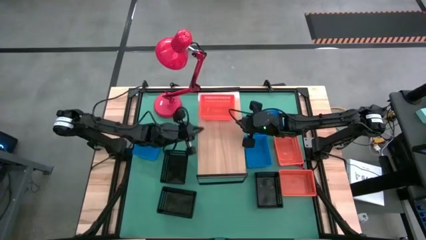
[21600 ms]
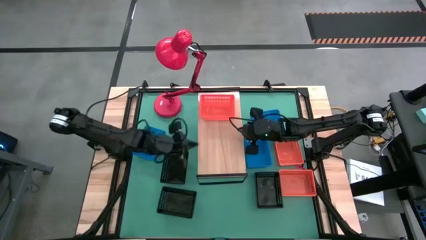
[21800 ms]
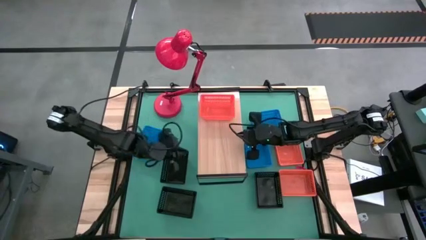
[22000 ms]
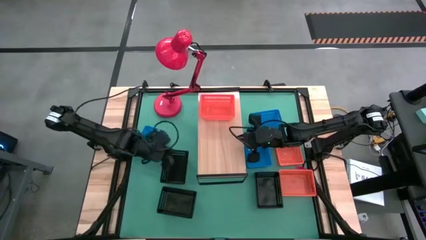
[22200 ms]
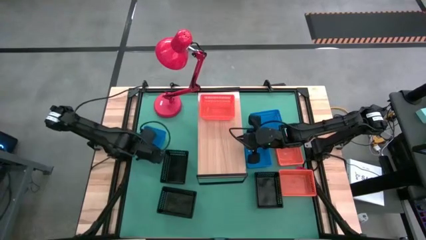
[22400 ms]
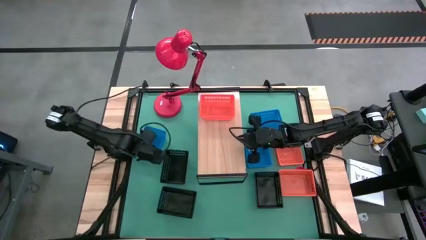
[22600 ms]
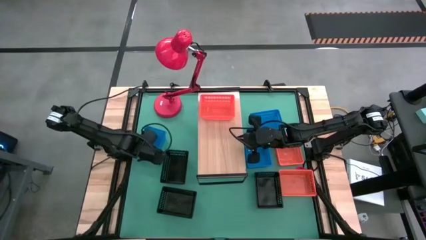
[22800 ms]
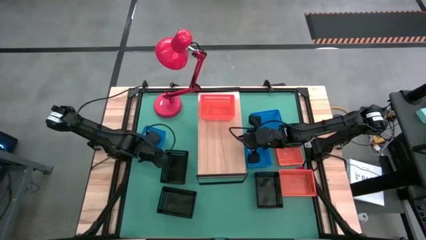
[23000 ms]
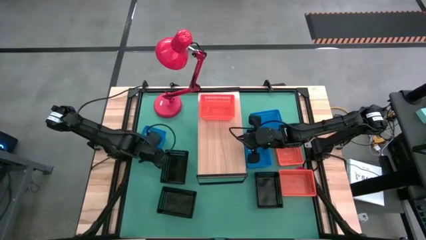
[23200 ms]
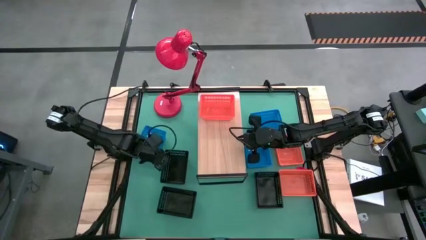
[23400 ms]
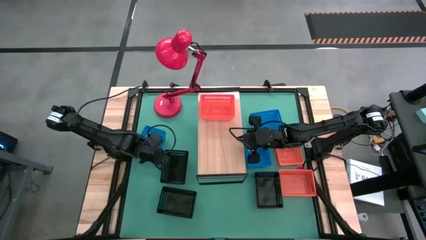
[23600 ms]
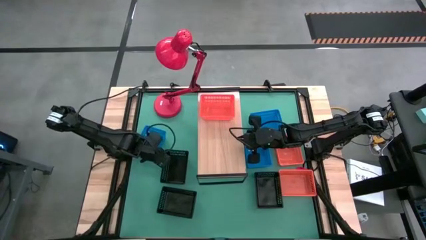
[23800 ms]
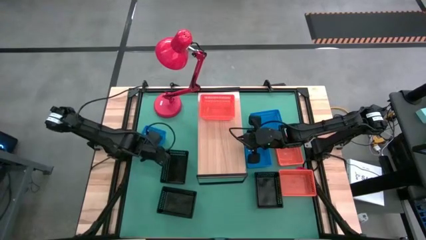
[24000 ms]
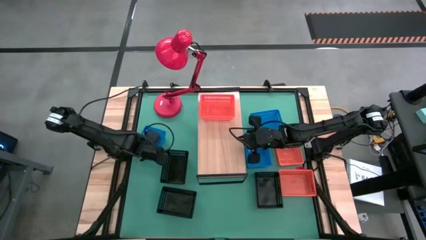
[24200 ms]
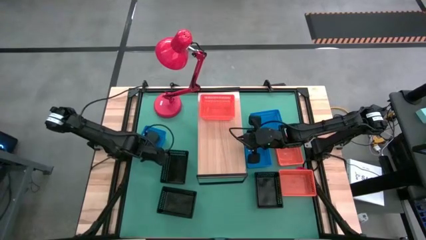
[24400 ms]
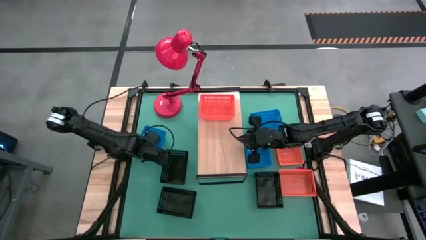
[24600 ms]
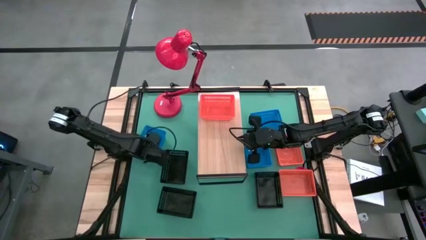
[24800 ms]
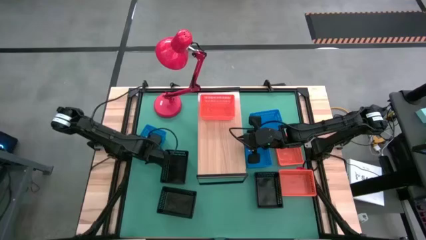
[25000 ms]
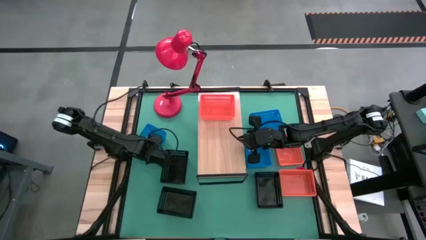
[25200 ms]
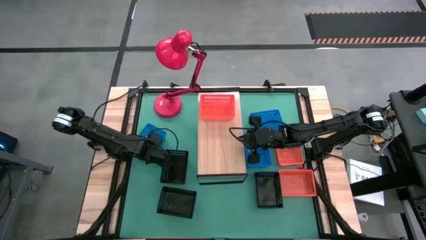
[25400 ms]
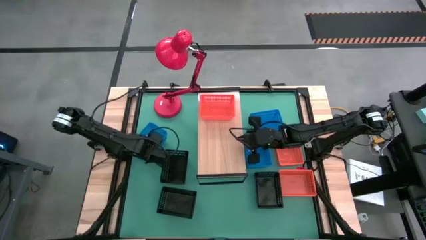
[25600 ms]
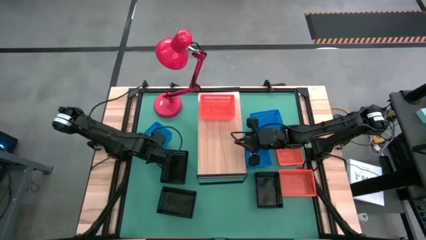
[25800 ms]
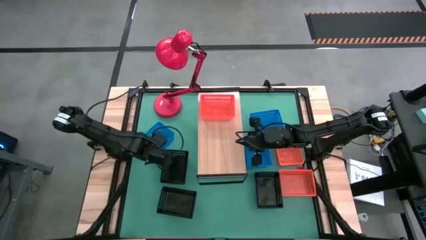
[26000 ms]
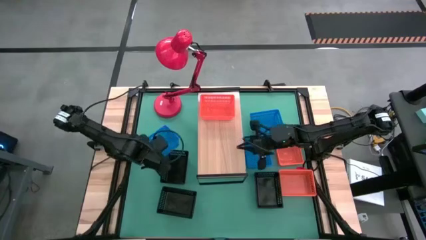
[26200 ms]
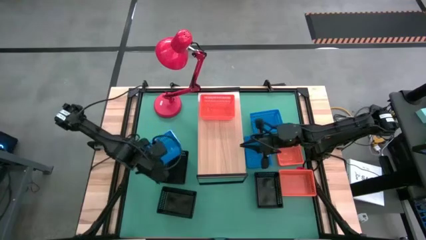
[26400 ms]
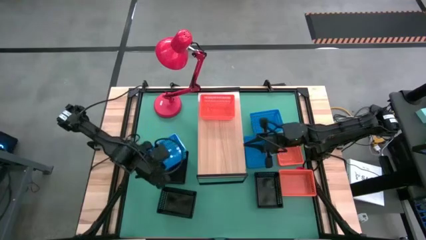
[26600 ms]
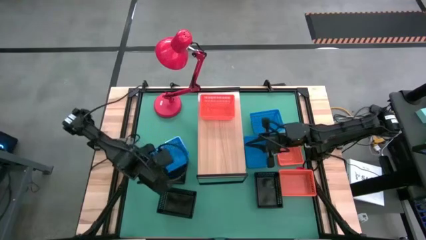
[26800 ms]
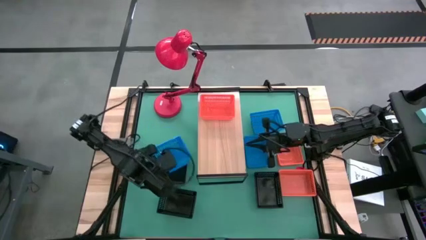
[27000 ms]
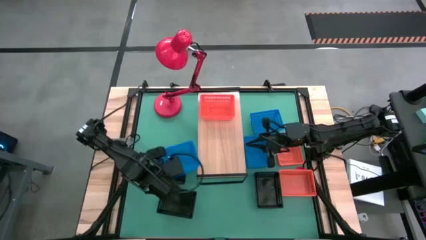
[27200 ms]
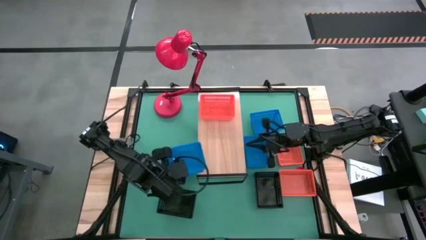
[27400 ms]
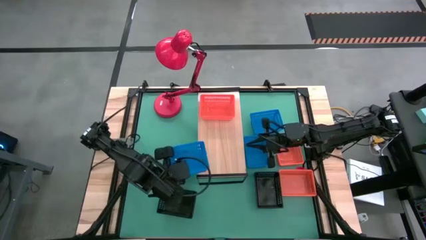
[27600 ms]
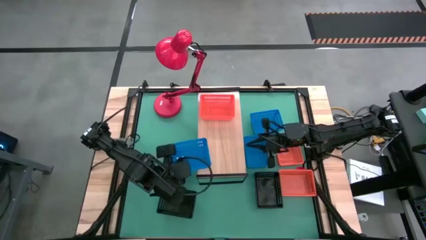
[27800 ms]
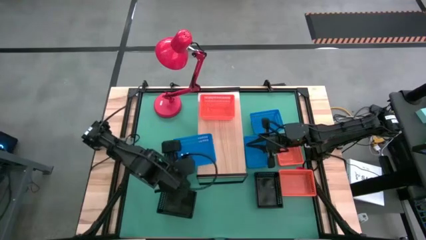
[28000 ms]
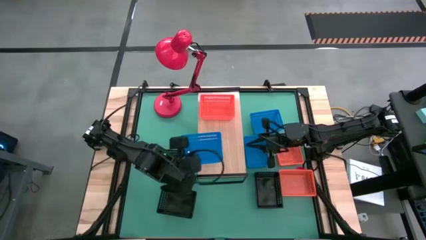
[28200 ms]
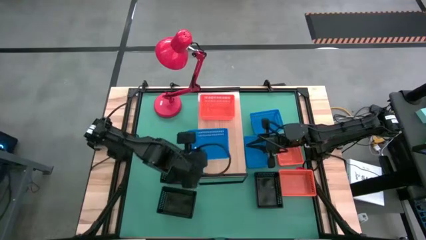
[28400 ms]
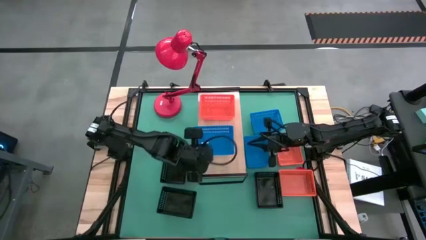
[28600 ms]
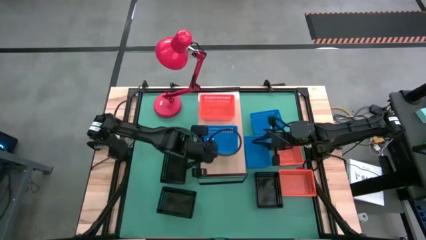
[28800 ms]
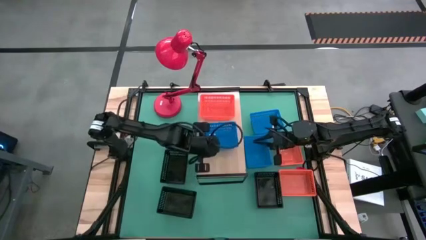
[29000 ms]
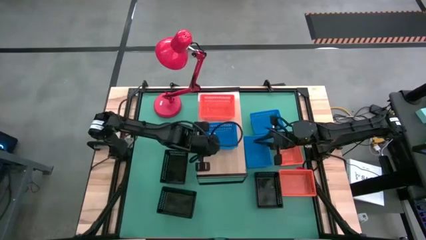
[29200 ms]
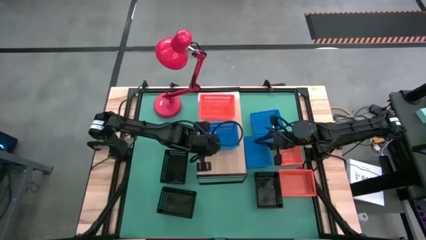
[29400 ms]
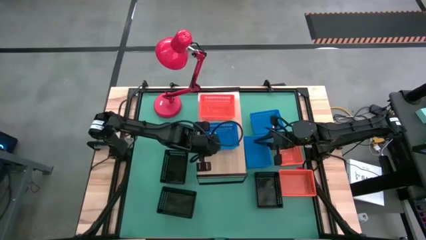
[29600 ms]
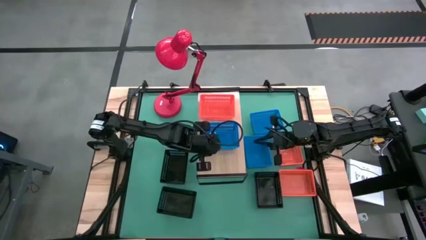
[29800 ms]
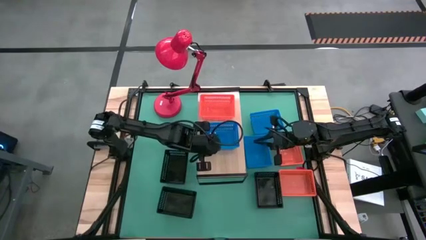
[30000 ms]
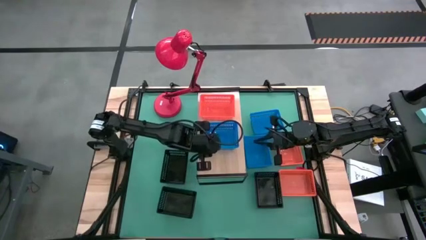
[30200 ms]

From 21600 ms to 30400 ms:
Task: Stack baskets on shelf by color
Put the left blue bin on the shelf

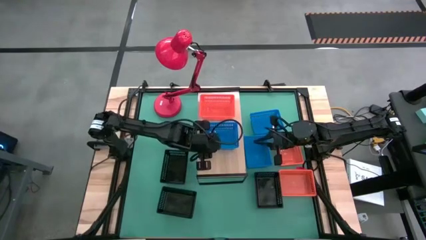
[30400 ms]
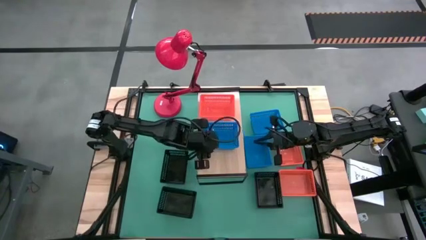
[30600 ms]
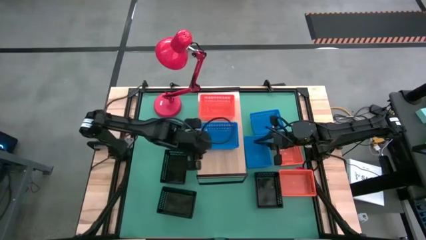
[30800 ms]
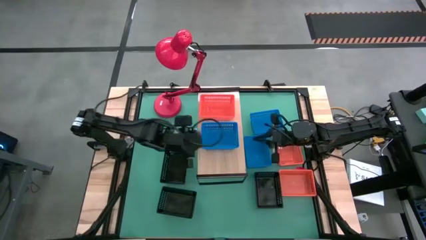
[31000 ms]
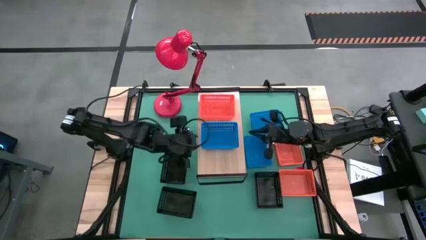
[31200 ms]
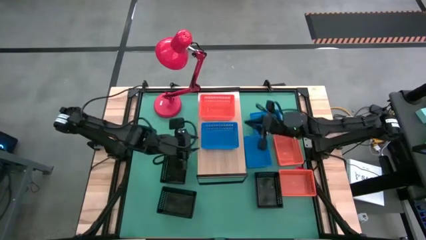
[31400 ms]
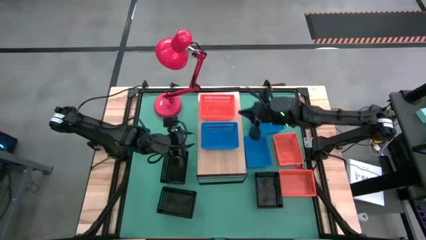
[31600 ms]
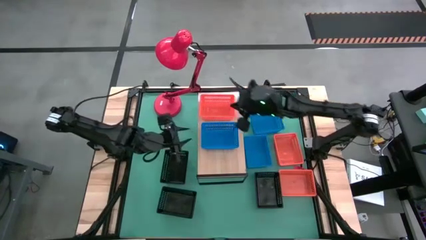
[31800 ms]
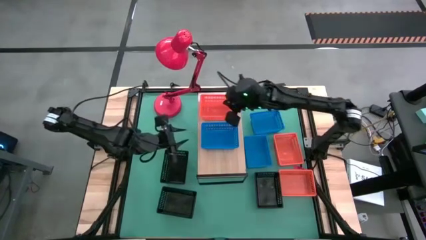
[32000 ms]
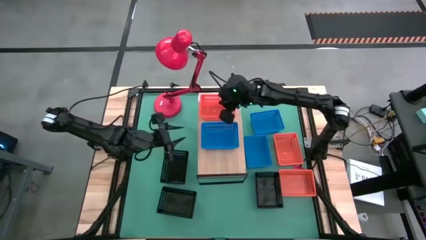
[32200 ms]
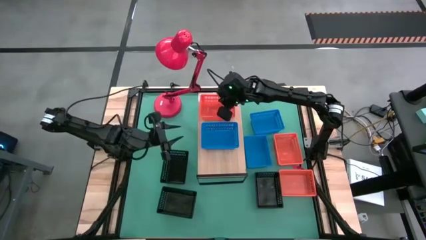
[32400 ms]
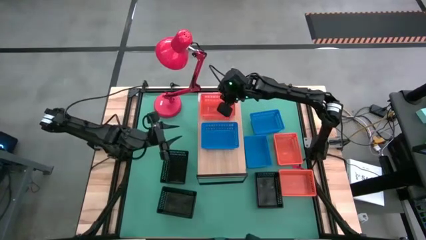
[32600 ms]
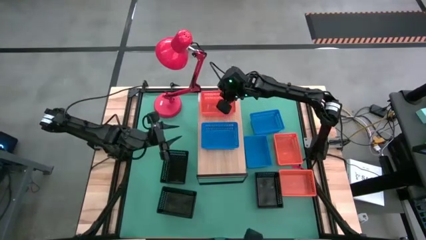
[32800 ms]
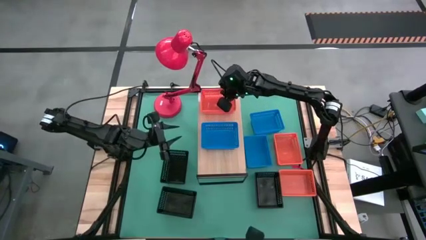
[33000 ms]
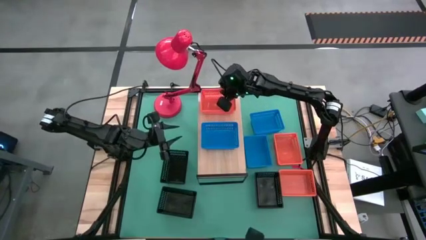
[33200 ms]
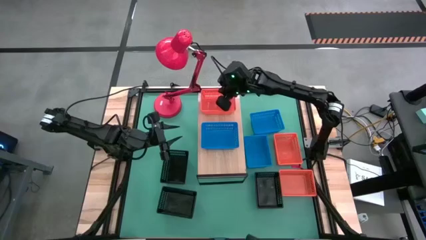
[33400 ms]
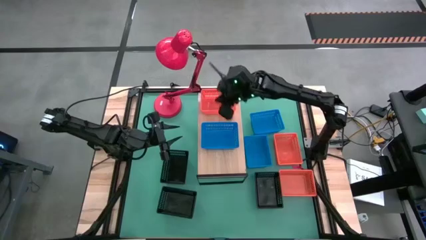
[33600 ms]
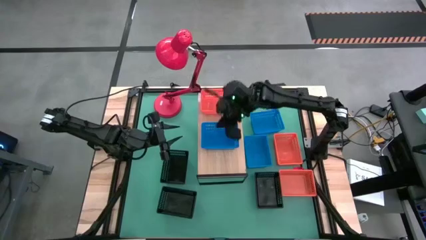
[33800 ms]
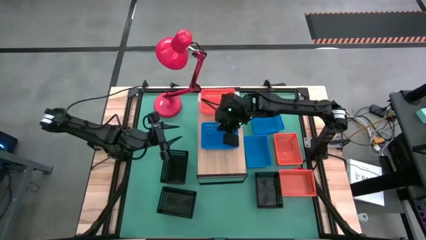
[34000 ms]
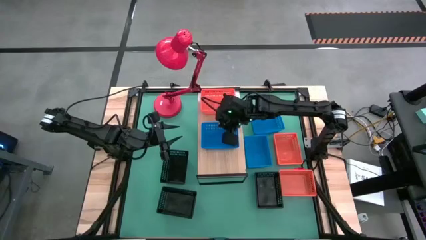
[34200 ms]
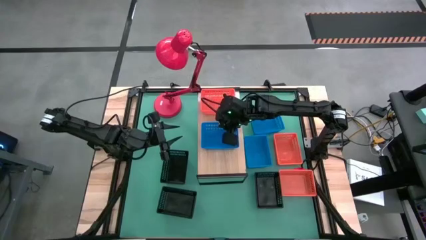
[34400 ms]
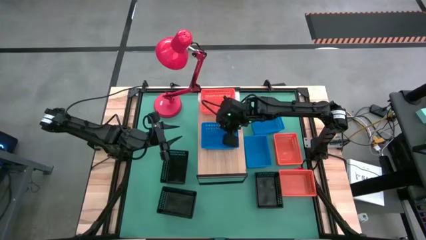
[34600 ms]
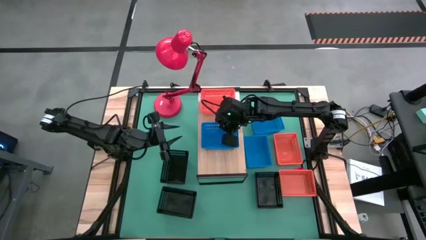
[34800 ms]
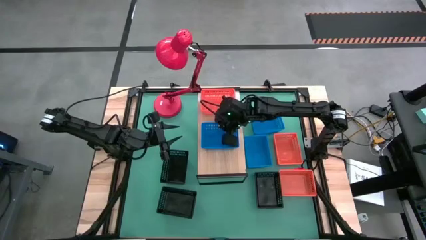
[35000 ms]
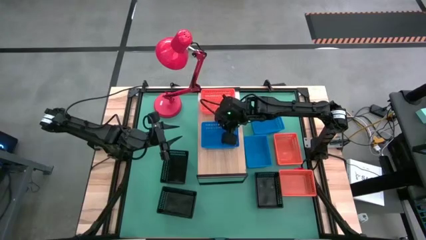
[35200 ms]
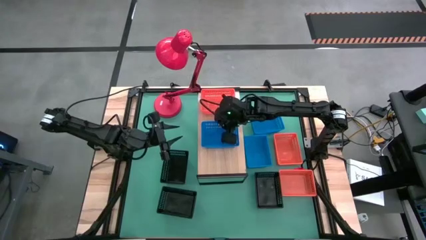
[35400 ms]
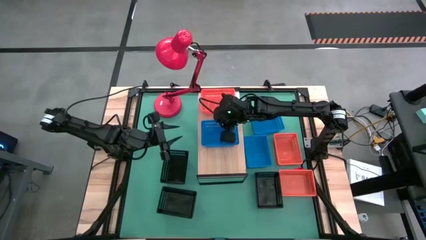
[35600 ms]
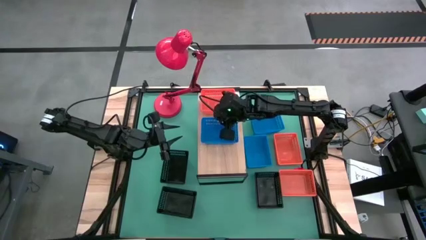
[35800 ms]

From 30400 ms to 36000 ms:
Adjust the bins on the shelf

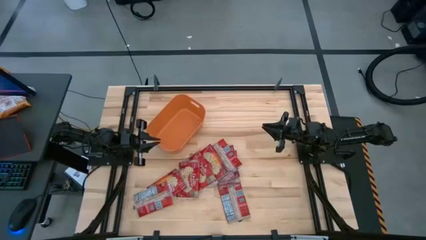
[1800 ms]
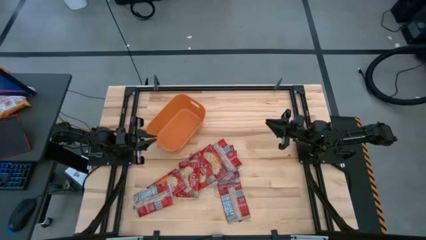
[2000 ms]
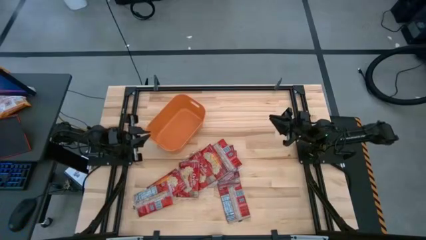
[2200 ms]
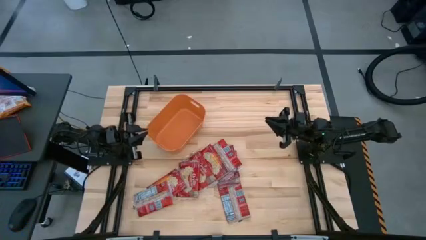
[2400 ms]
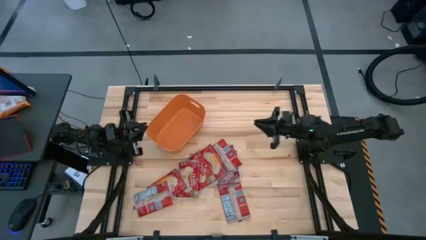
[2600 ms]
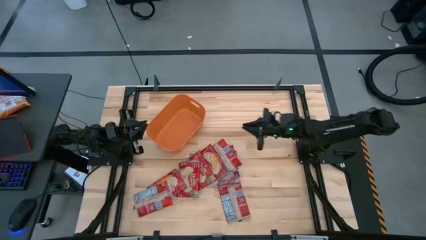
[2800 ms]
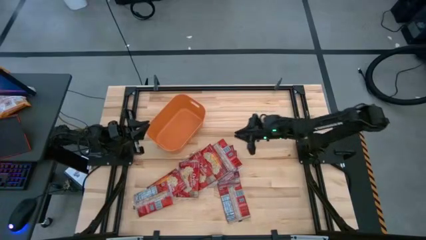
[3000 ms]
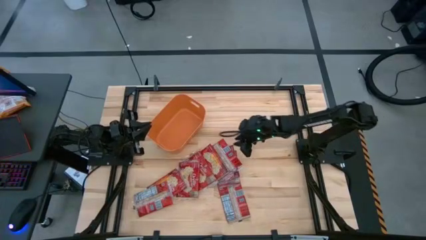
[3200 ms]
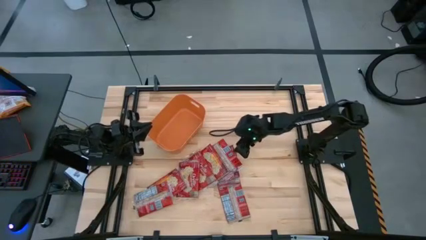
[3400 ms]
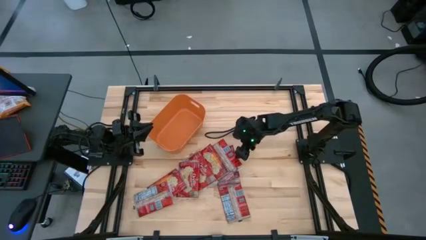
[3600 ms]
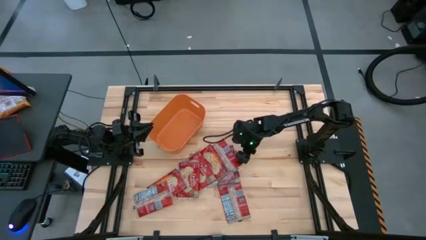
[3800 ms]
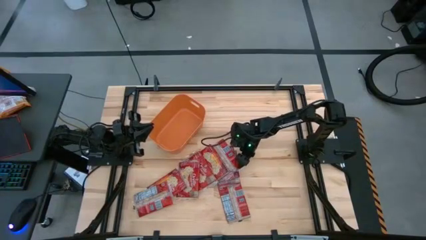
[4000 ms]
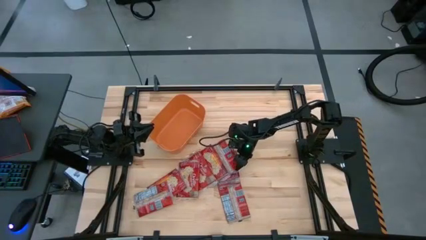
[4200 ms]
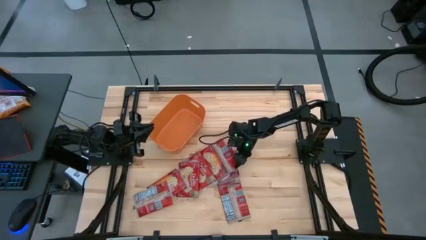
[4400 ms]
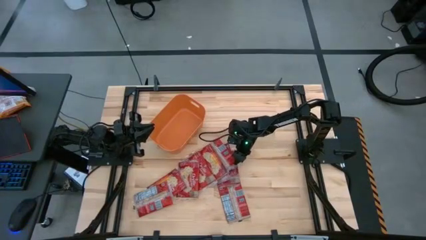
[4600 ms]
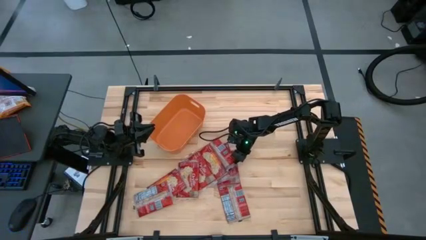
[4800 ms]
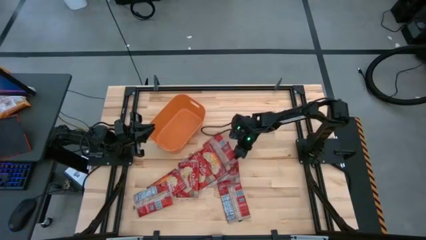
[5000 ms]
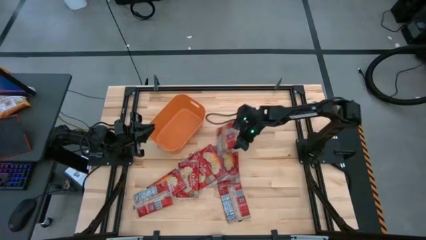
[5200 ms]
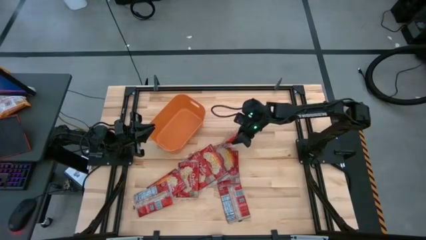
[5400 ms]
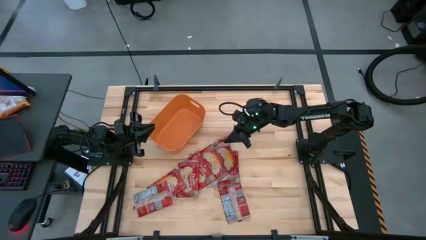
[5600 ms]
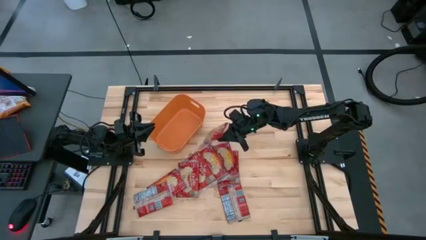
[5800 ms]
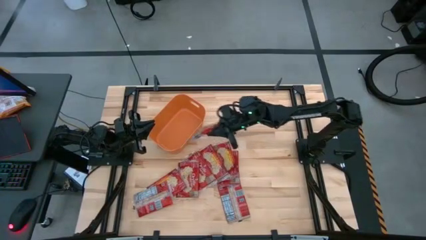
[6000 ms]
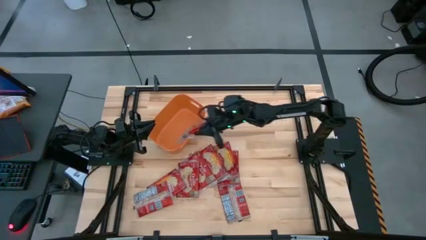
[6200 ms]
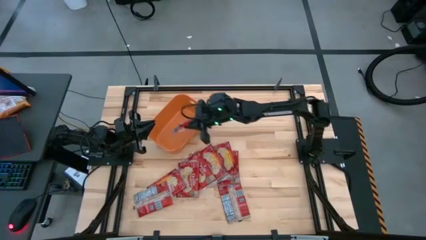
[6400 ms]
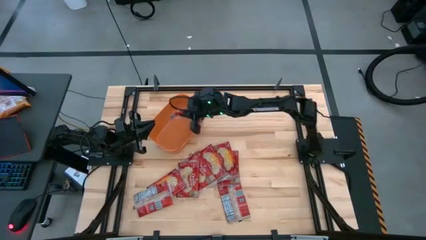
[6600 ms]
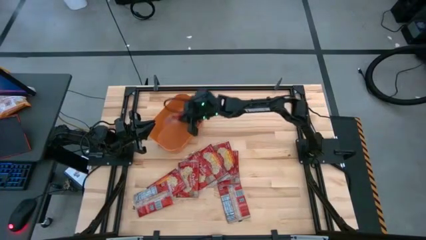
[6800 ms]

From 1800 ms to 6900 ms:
Task: Sort popcorn bags into baskets
Put the red popcorn bag into the orange bin
